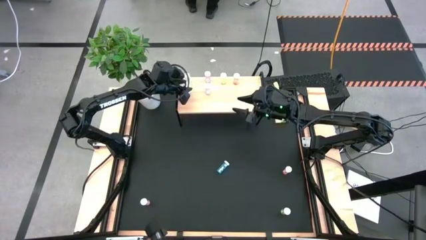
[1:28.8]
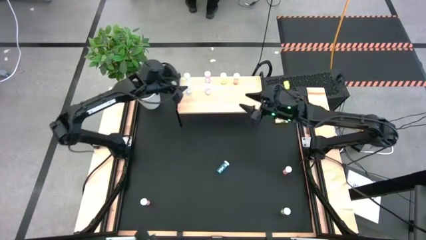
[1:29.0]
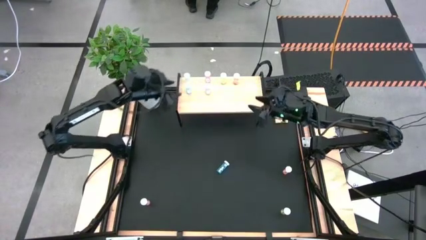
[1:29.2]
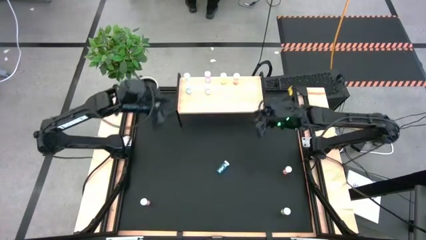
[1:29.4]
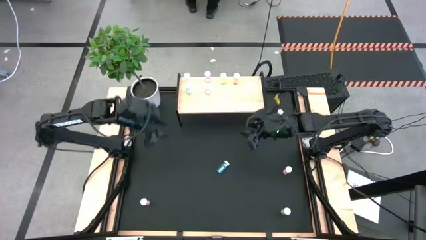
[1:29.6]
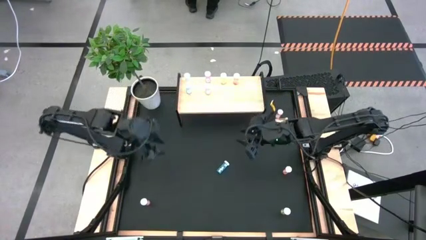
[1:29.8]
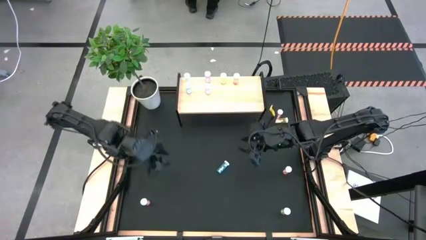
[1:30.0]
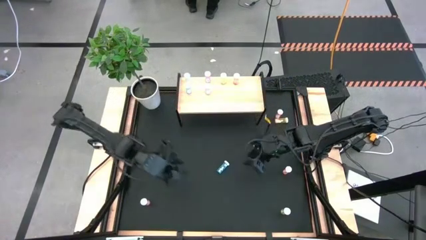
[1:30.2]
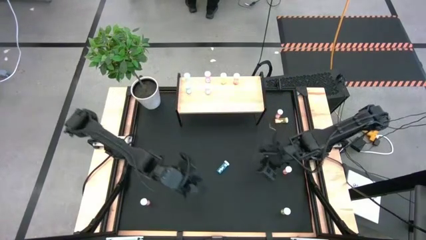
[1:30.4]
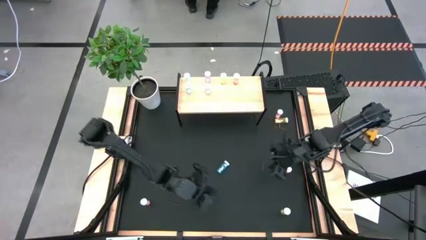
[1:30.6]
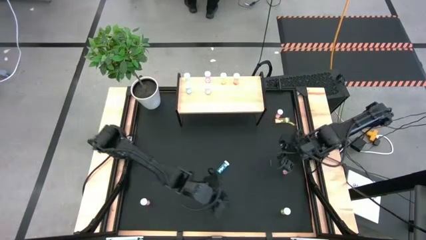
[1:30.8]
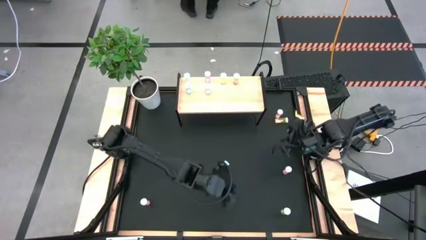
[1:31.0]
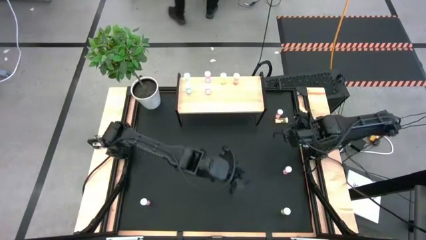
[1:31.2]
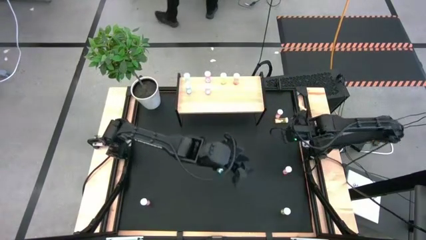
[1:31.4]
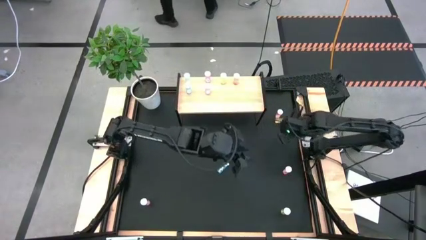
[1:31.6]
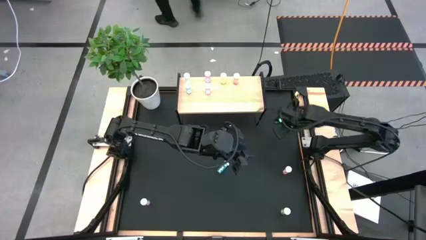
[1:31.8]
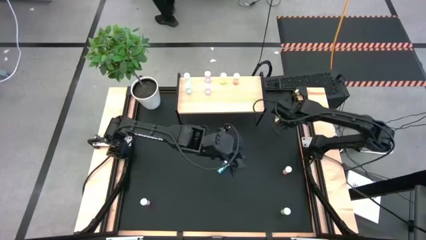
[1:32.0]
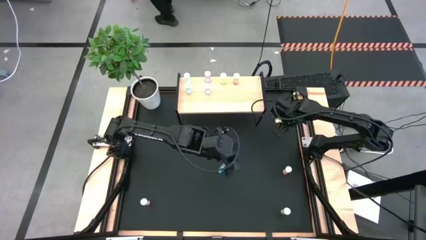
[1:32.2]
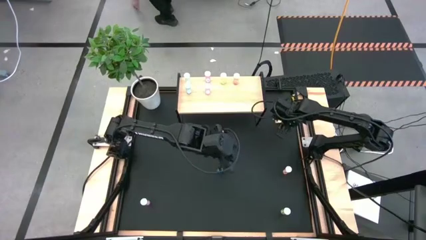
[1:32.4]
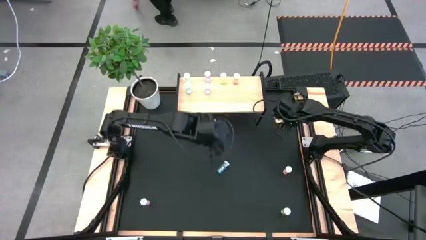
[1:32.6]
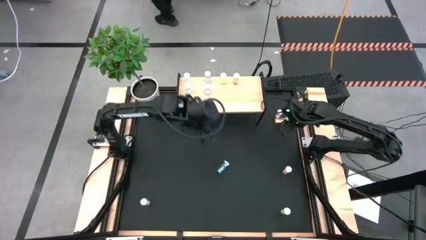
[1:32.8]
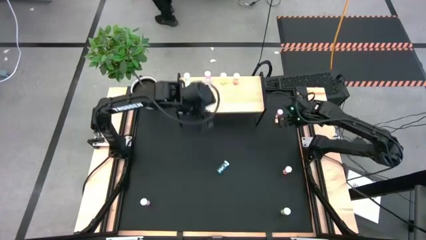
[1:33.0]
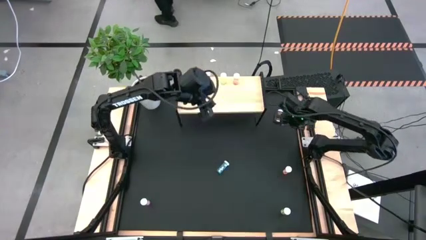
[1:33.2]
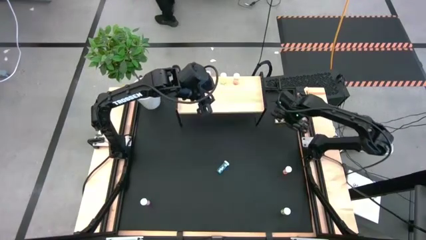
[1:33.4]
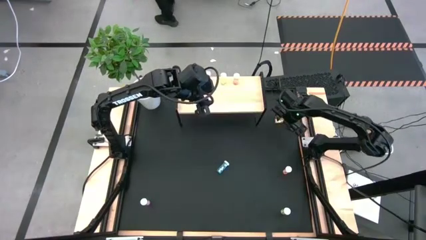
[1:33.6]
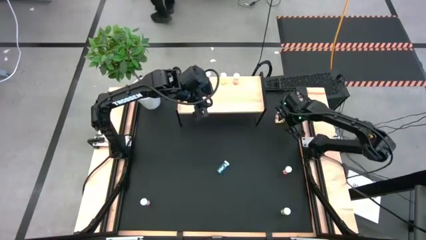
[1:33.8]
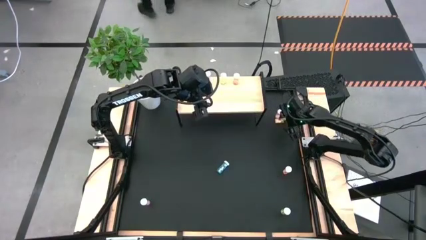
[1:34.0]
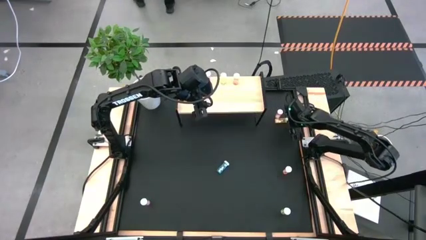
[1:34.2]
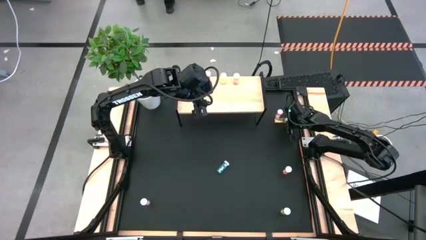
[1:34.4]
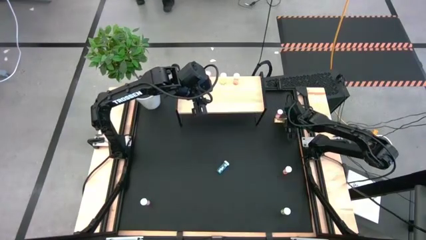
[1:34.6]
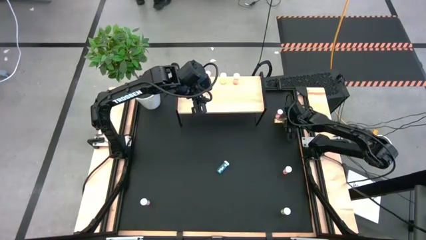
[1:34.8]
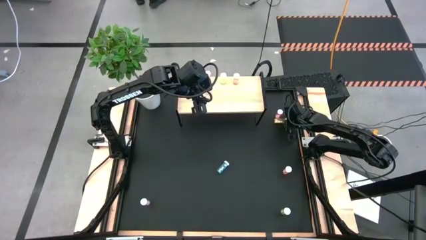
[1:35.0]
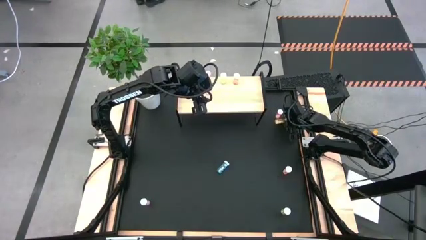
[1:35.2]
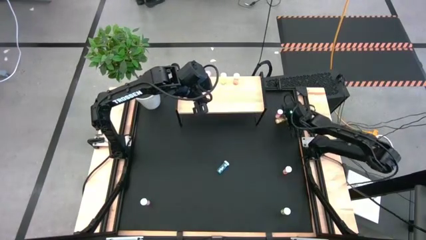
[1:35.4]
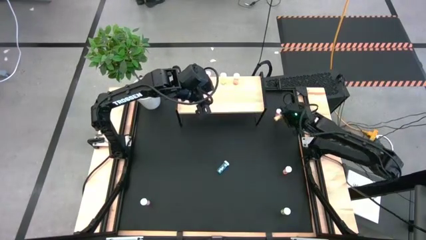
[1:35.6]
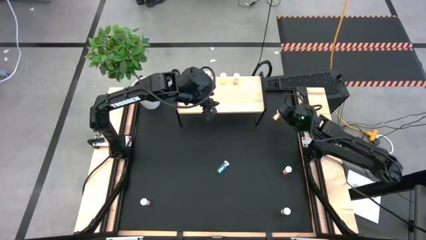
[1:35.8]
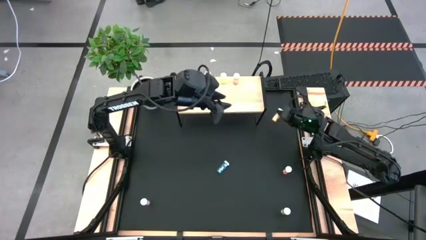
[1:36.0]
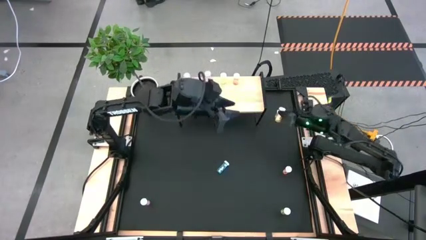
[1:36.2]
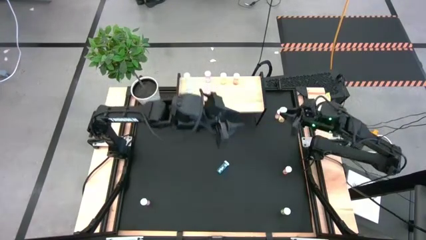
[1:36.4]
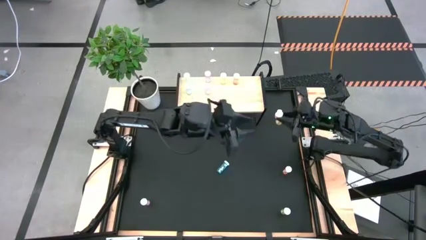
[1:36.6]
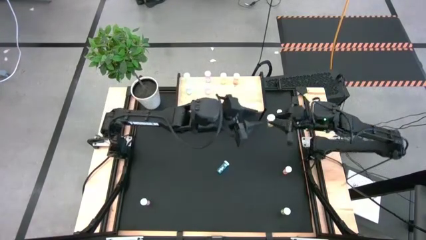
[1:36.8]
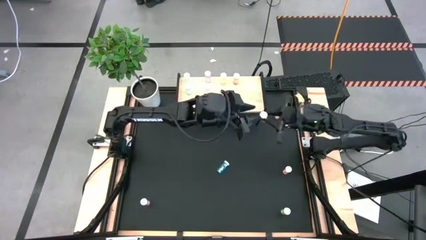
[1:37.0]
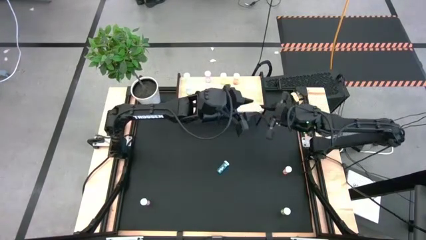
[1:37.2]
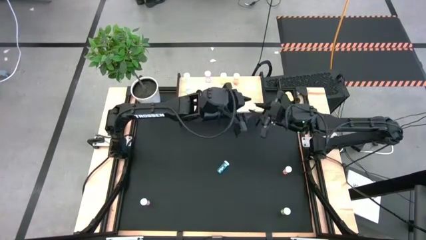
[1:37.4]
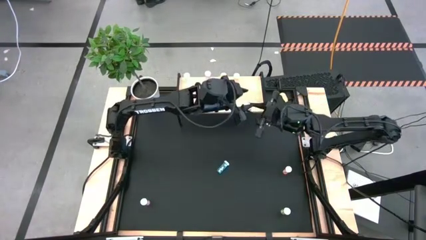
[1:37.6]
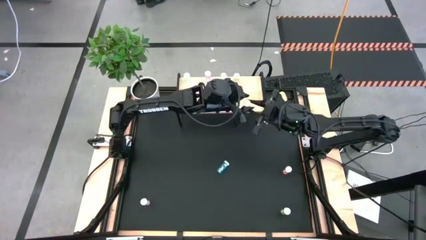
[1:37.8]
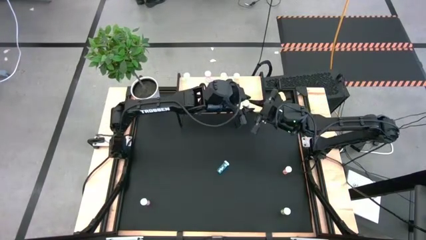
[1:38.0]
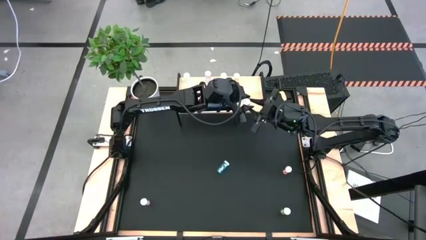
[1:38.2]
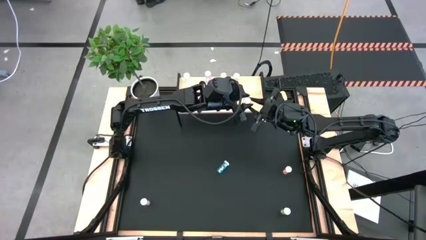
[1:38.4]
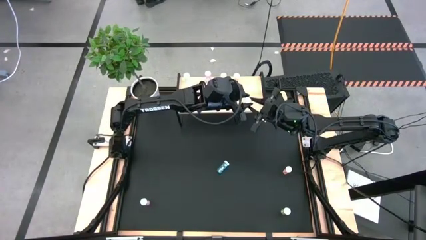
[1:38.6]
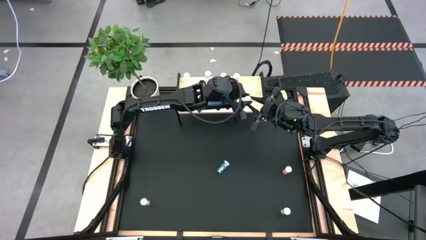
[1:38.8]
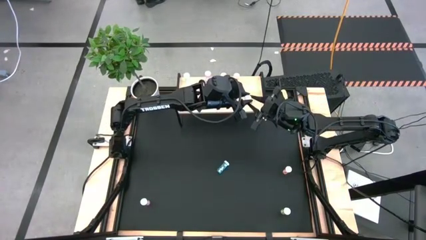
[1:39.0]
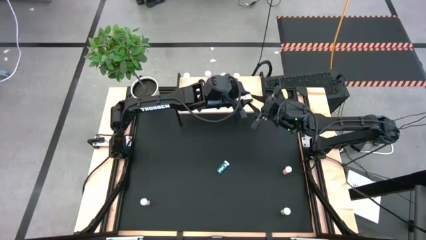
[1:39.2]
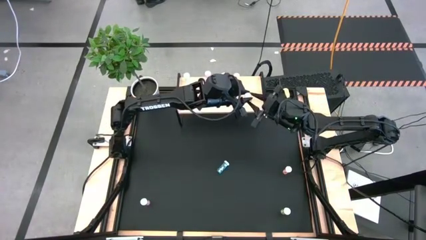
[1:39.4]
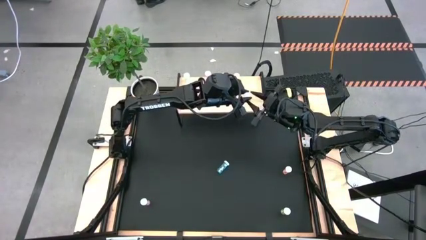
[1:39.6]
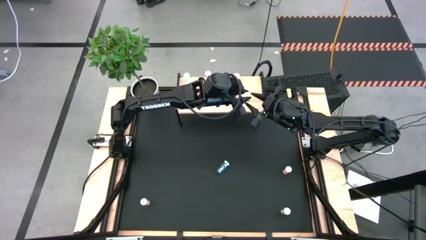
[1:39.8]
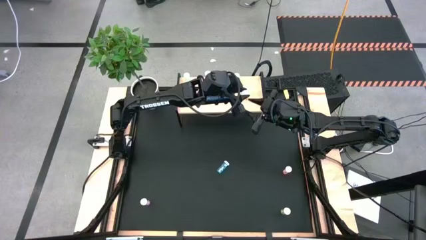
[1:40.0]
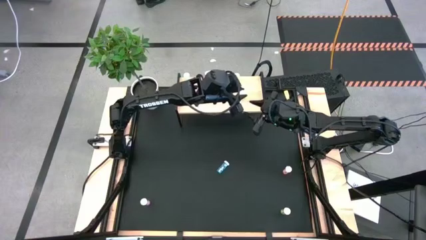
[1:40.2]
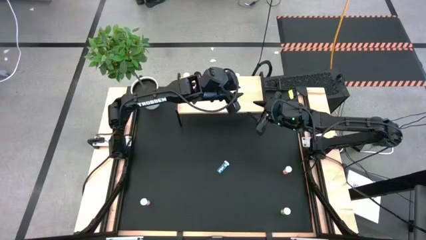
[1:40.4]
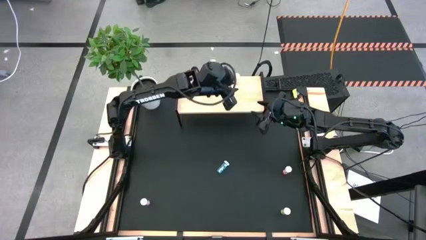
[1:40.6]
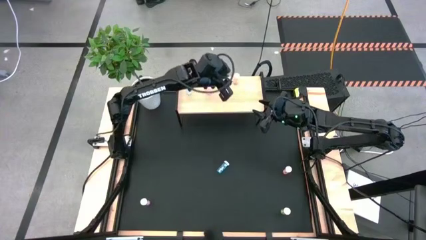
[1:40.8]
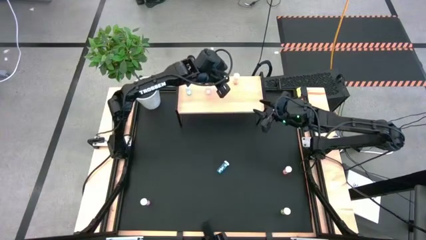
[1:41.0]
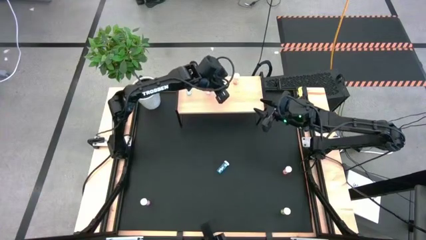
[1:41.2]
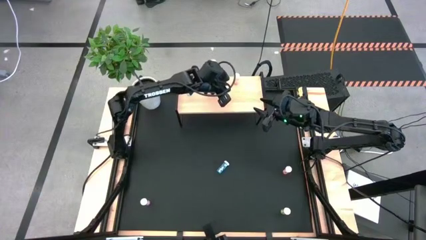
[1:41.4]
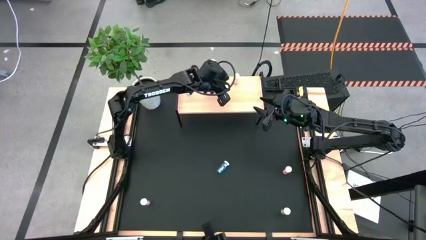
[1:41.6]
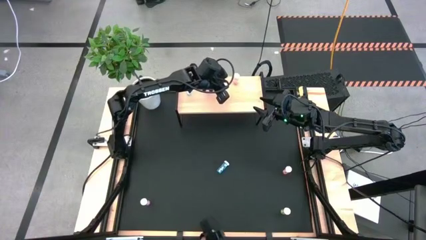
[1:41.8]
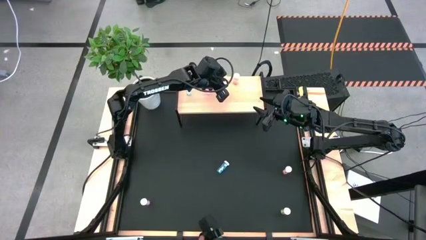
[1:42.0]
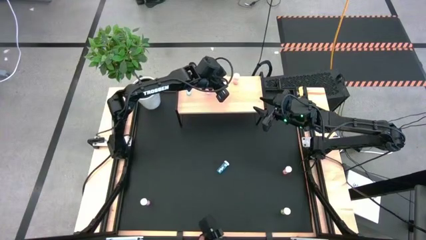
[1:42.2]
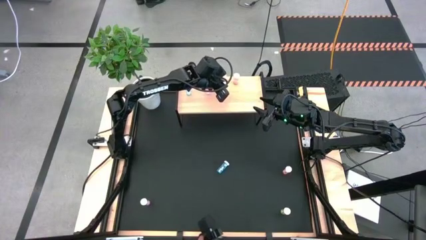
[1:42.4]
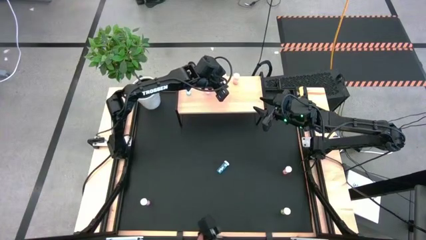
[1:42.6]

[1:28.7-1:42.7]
Task: Pick and place medicine bottles onto shelf by color
Put the top yellow pill bottle on the shelf aligned with the other yellow pill bottle
